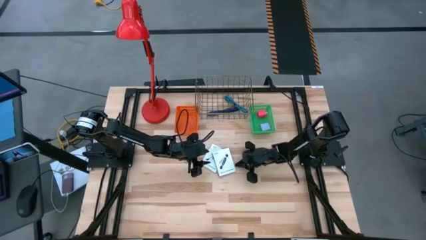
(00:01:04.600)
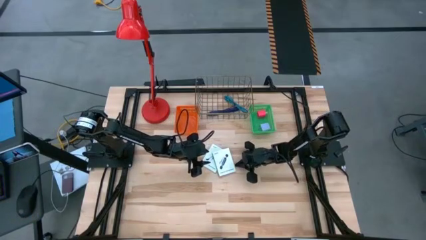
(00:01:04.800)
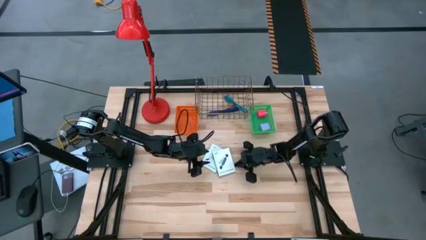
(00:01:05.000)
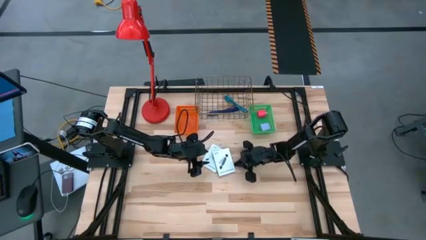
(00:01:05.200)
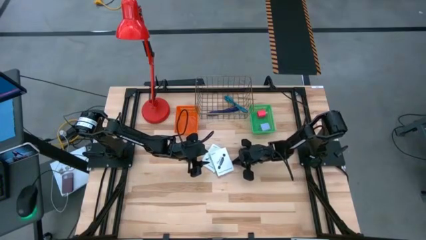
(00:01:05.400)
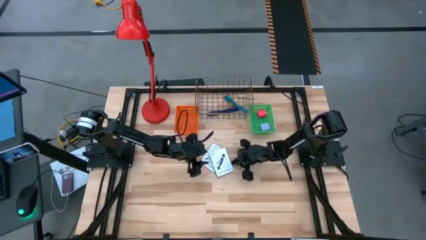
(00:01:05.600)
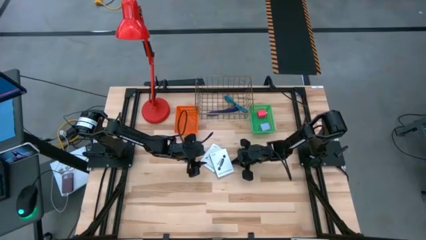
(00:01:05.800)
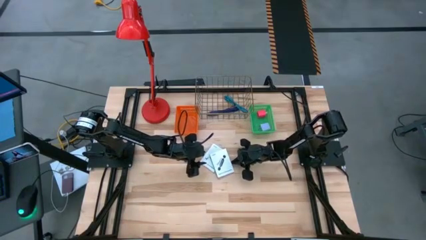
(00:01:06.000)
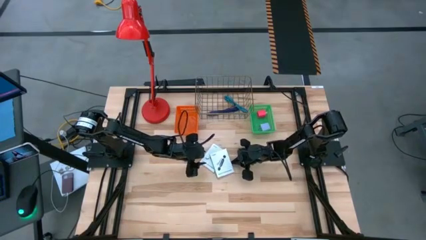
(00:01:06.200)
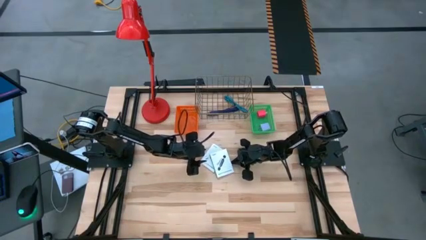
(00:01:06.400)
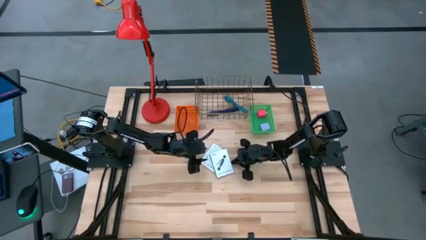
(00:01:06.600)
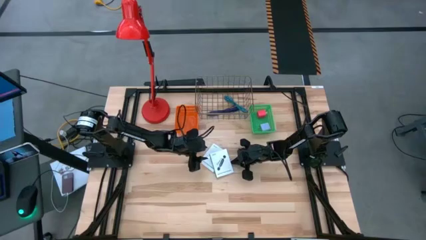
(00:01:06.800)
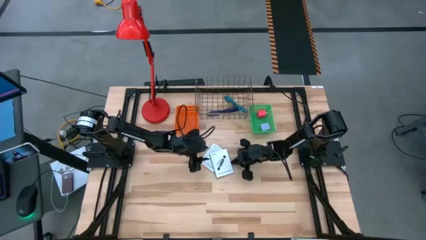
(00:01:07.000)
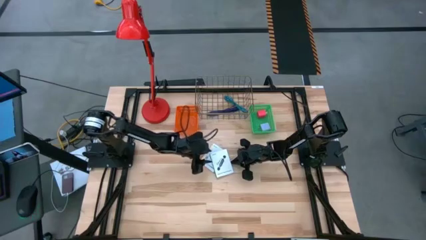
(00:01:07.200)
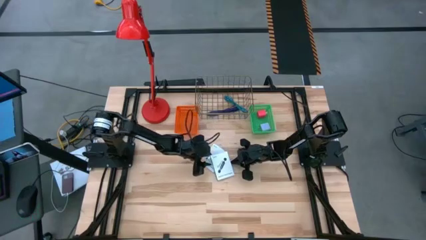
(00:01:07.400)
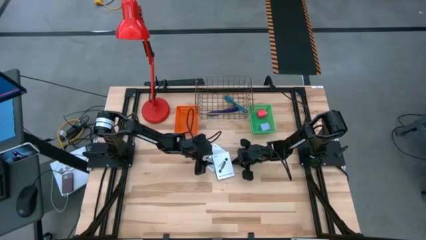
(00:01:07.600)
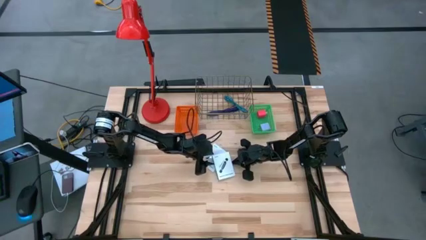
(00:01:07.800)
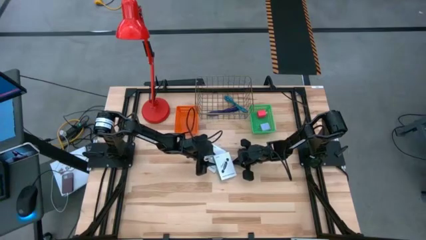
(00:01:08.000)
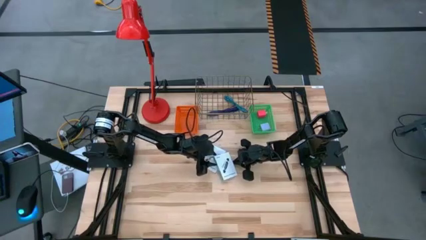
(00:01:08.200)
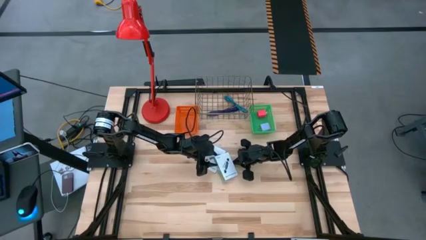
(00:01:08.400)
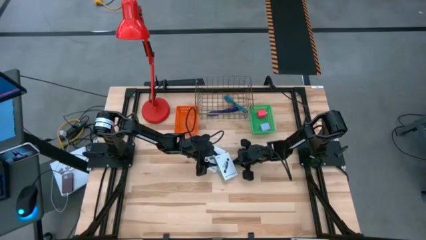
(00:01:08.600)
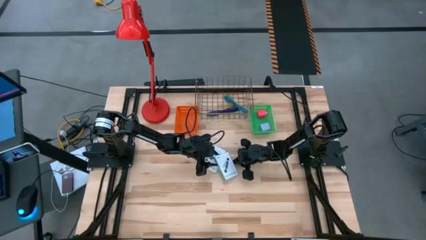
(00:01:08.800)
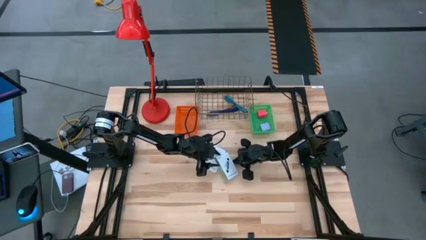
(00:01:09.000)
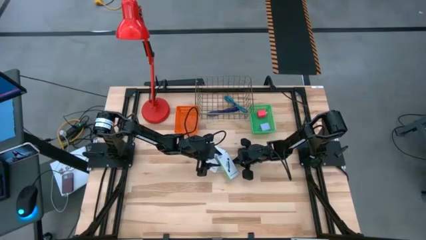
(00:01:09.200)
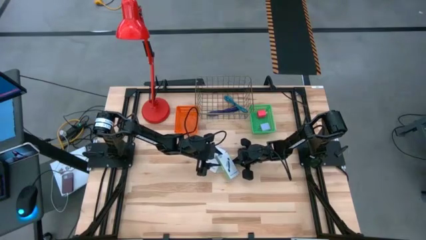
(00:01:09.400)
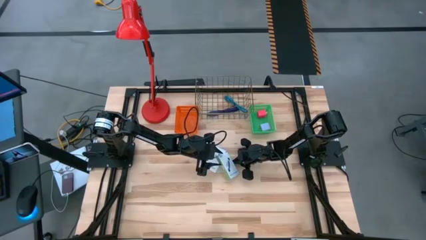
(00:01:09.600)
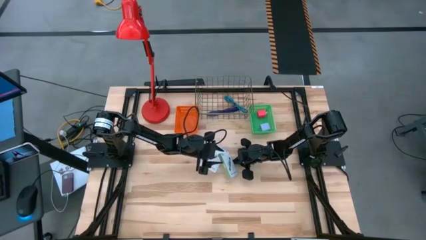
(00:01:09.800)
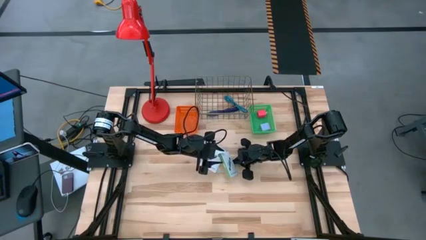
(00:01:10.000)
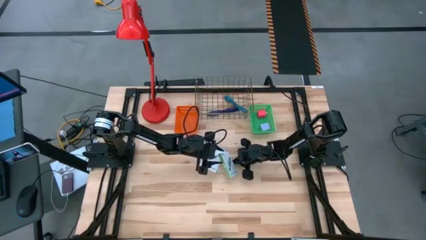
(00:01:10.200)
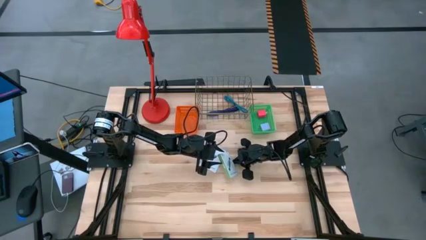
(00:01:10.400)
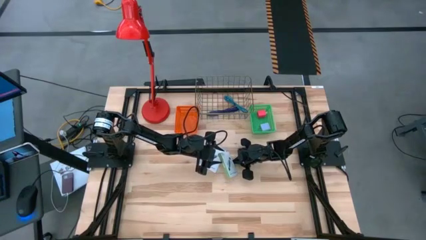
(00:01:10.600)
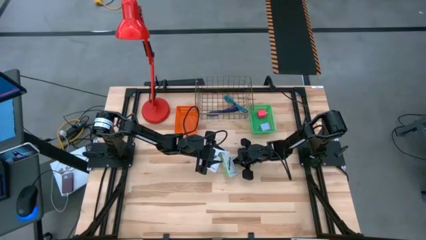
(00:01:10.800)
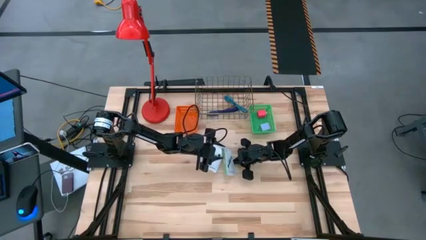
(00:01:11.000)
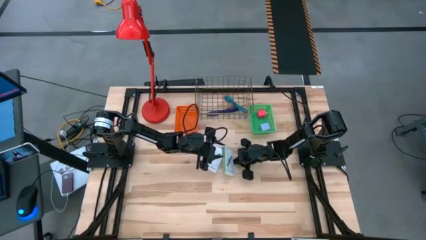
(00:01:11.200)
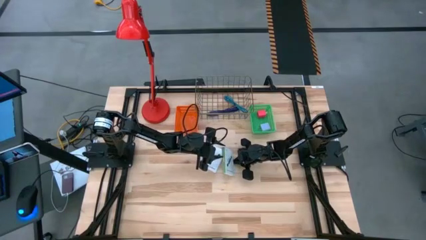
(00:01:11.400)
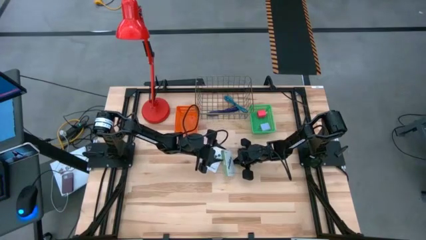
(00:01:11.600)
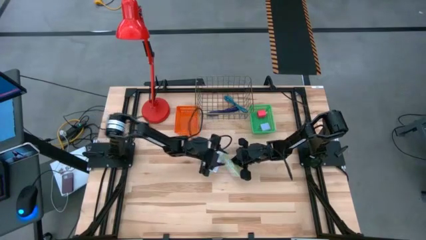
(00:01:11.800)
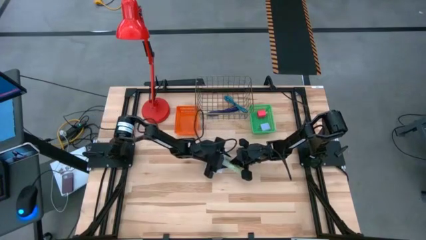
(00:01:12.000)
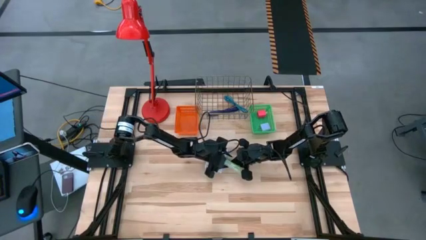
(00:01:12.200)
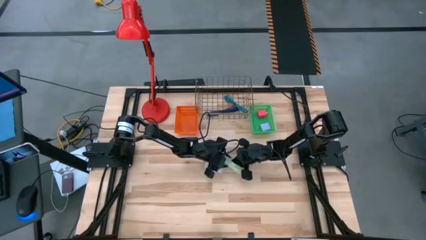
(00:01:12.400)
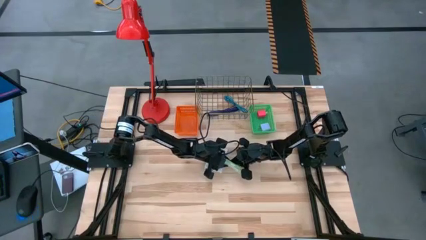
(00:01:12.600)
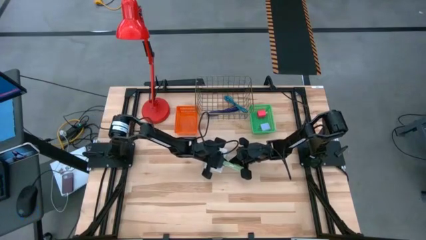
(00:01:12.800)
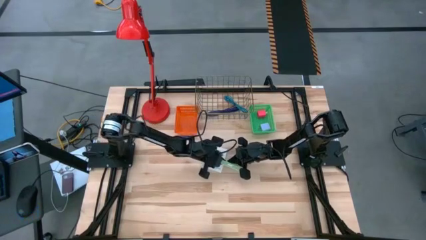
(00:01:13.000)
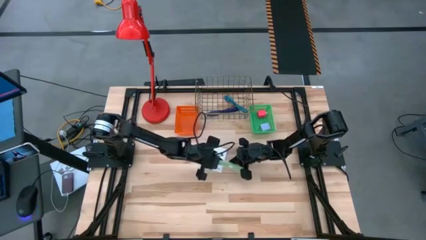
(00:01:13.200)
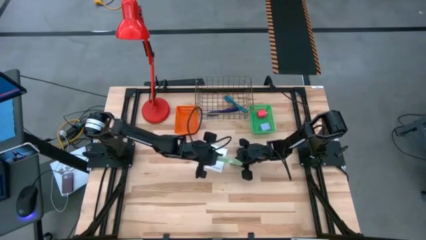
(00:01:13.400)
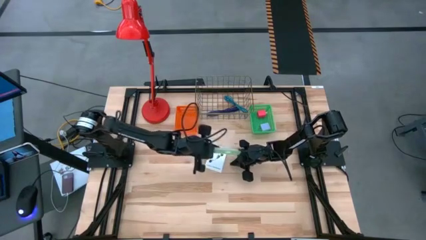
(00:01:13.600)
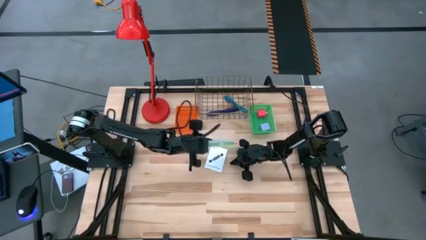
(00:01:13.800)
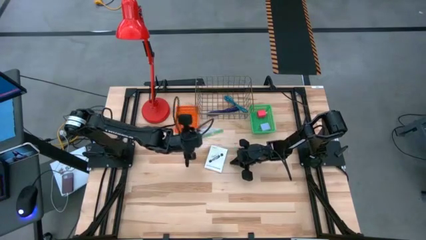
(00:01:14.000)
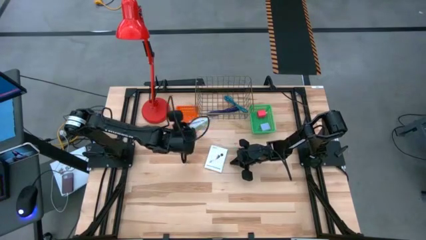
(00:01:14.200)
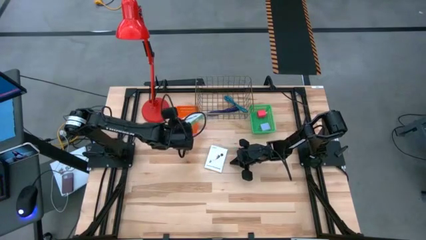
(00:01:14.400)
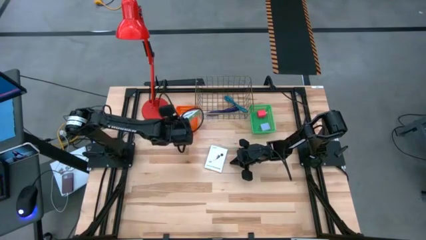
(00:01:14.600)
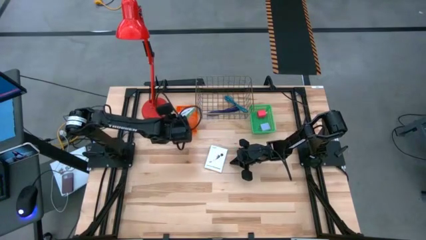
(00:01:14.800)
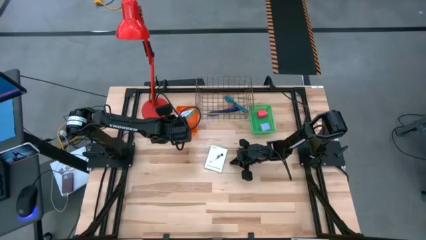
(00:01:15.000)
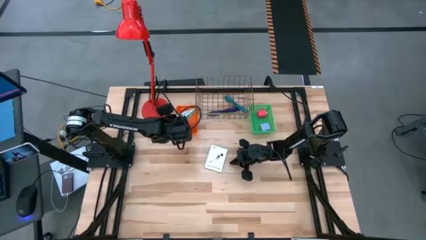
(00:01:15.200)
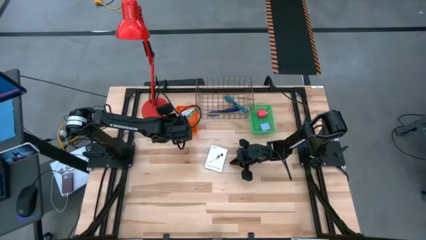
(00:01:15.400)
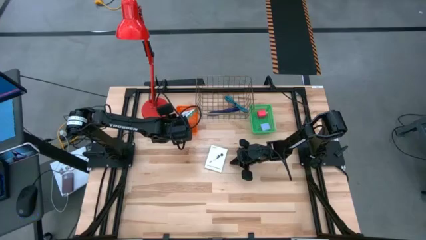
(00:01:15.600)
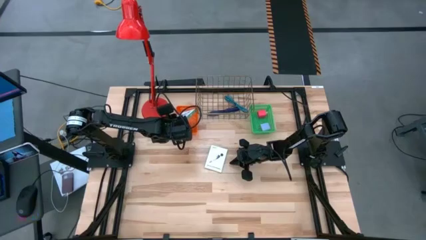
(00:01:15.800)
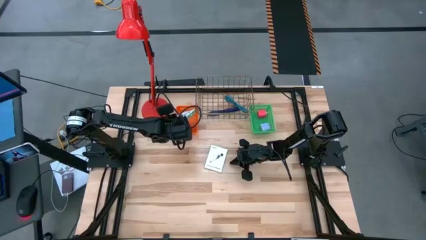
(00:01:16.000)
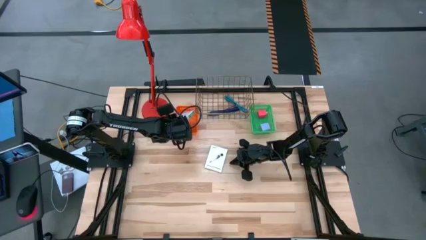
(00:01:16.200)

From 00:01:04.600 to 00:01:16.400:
Task: Pick and place items into bin
Put the card reader box into the orange bin
